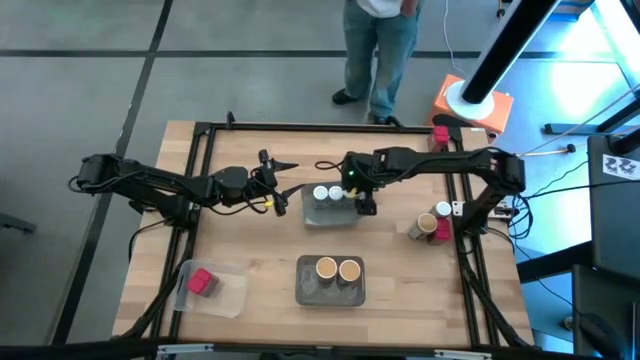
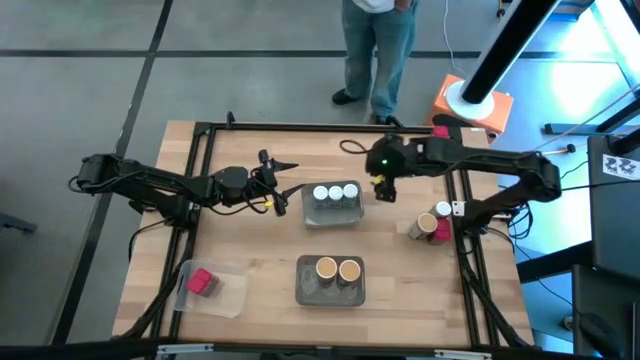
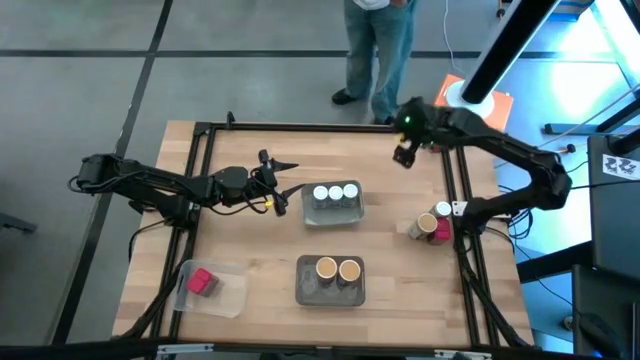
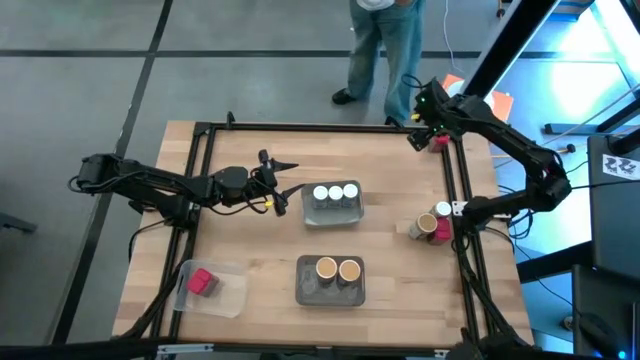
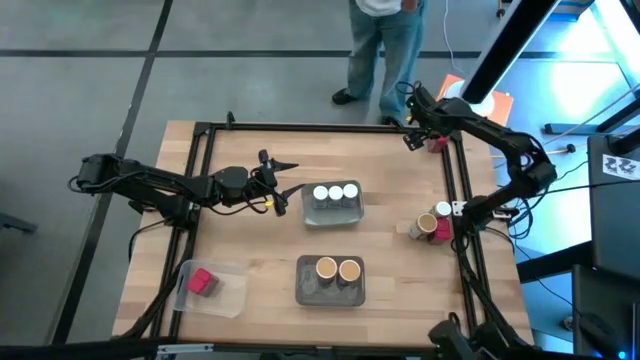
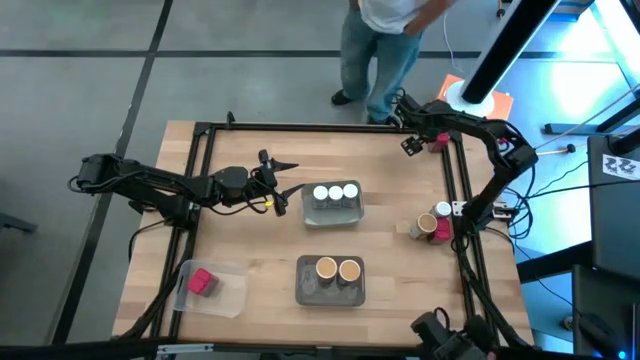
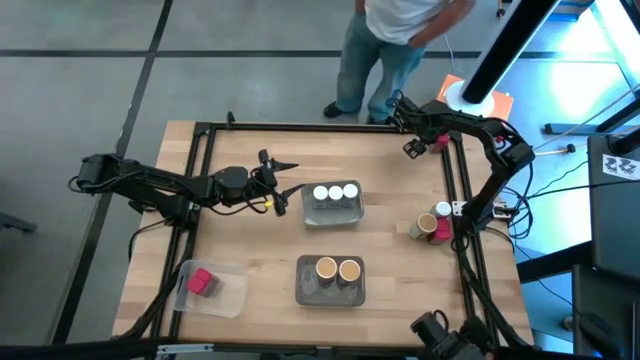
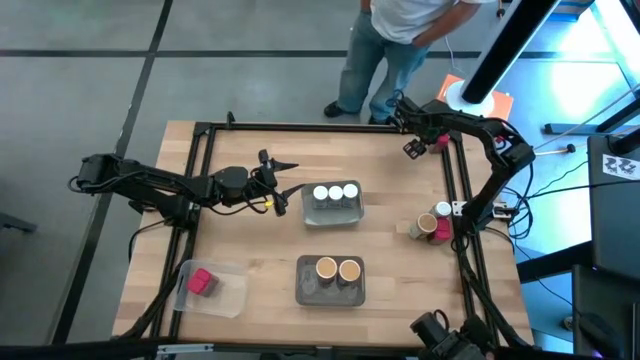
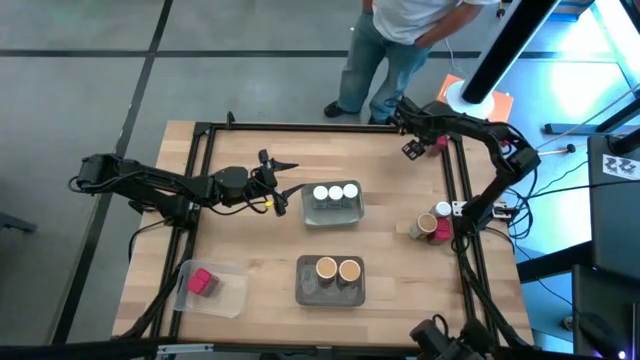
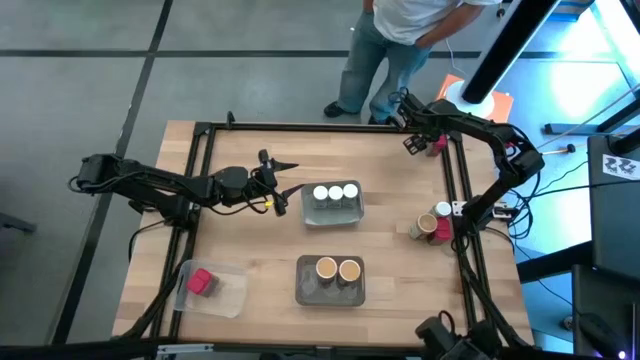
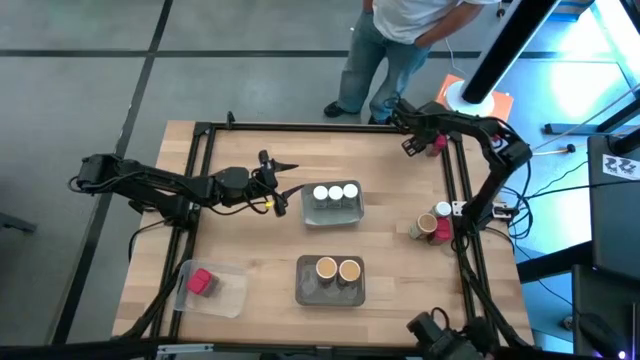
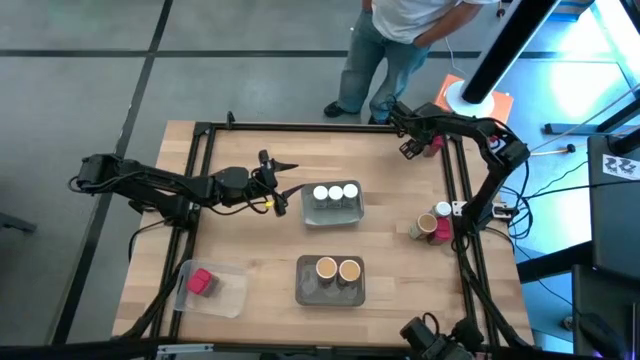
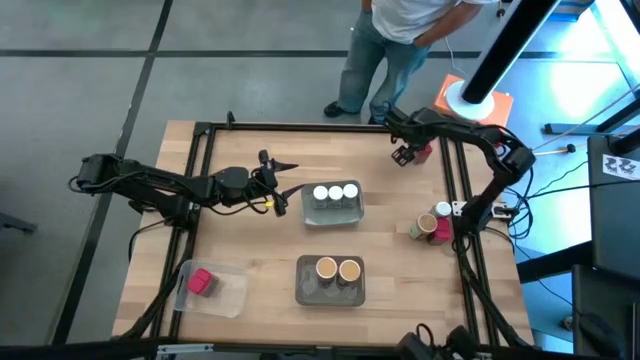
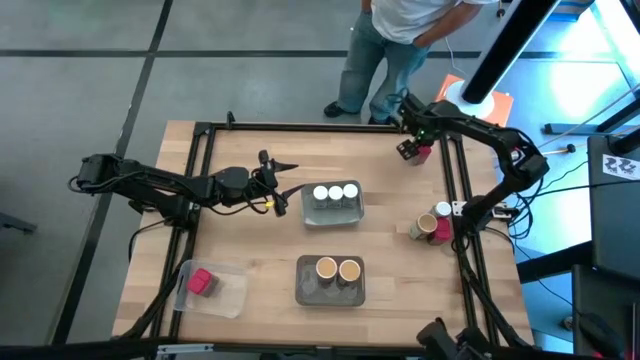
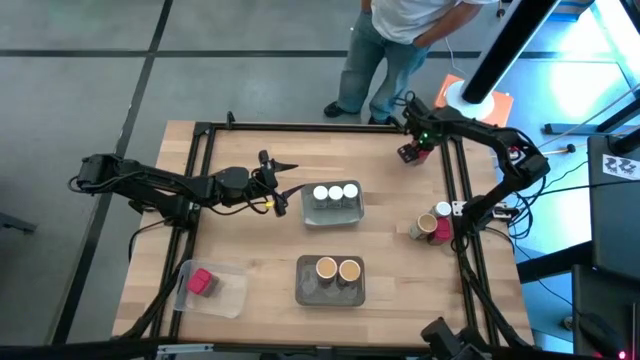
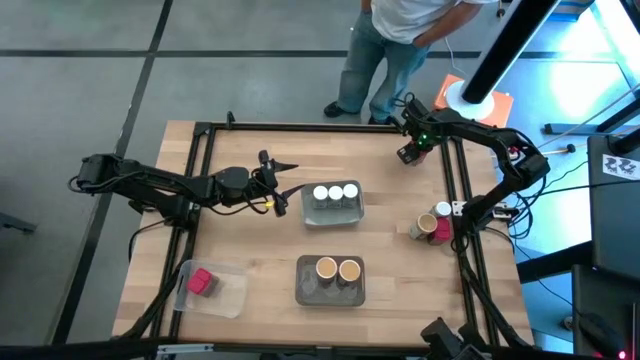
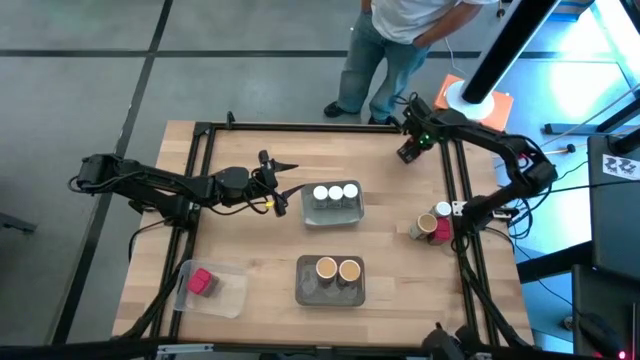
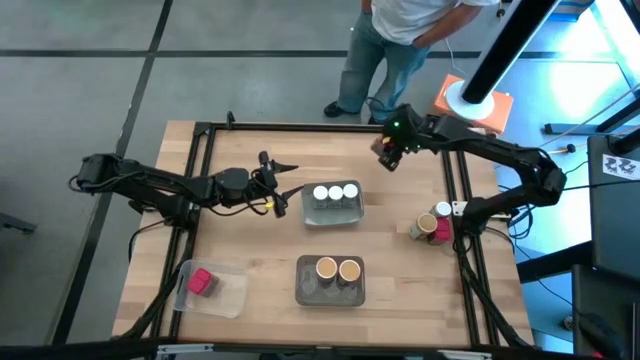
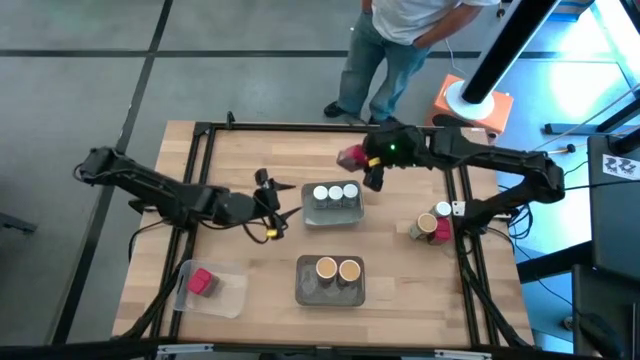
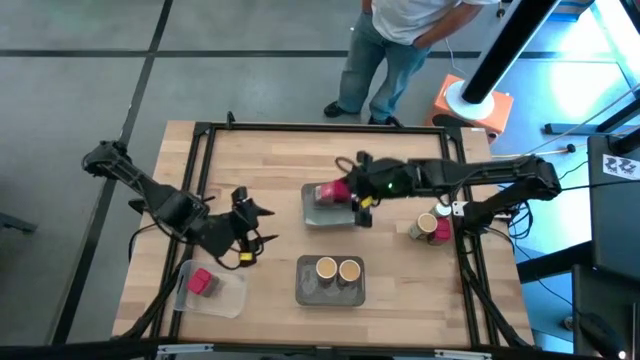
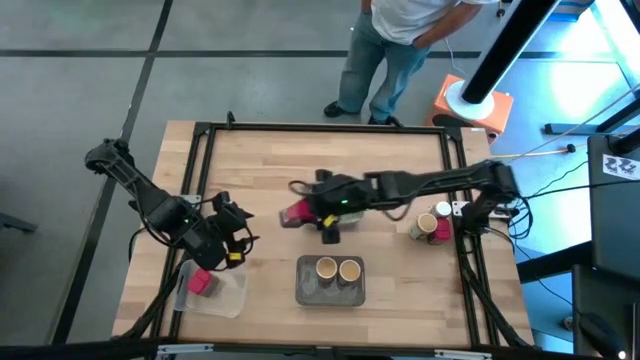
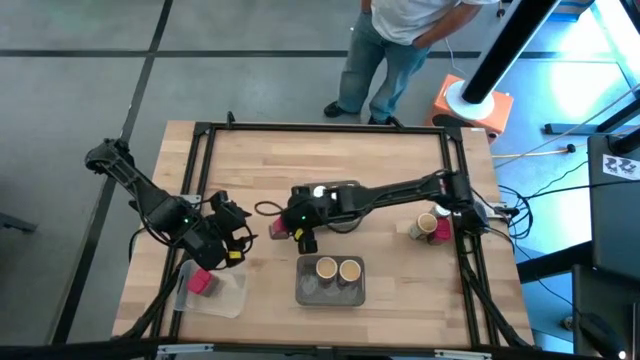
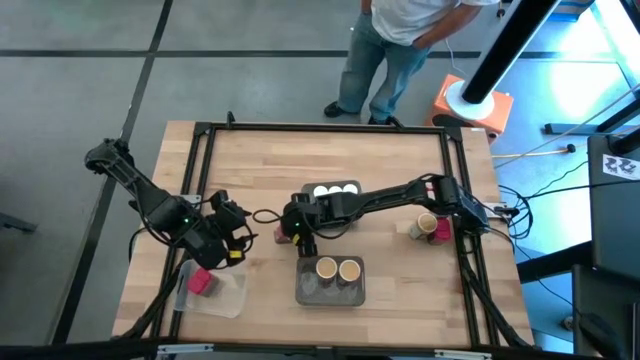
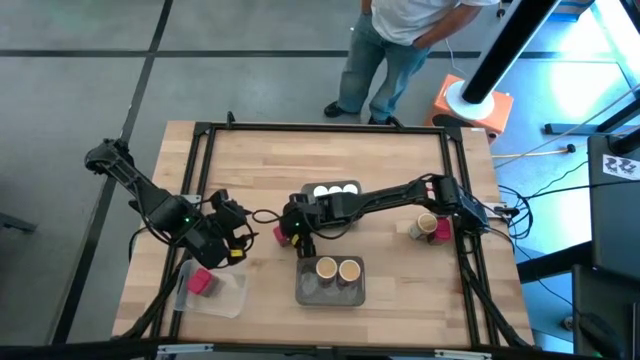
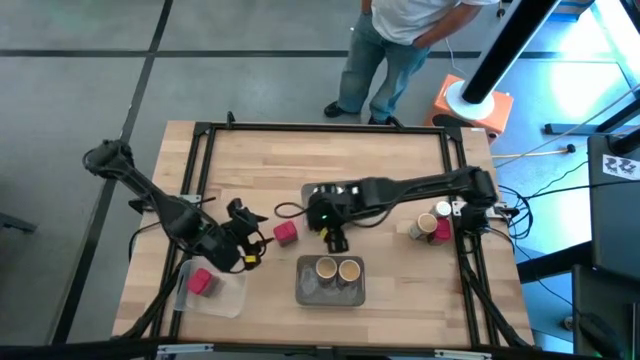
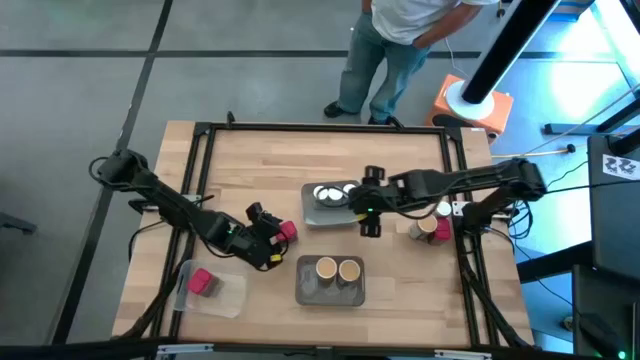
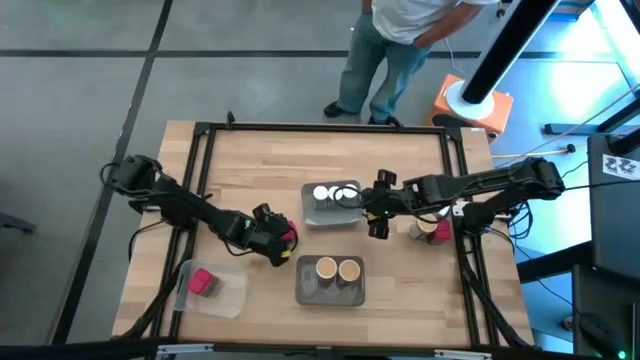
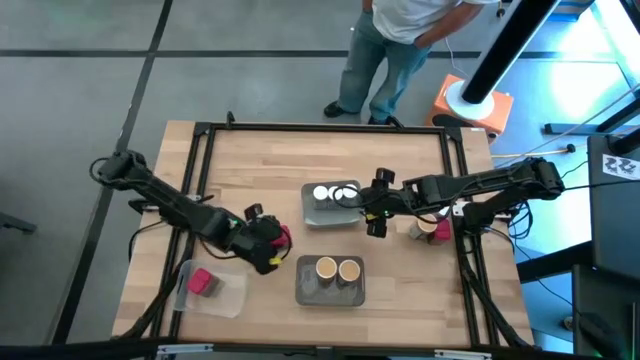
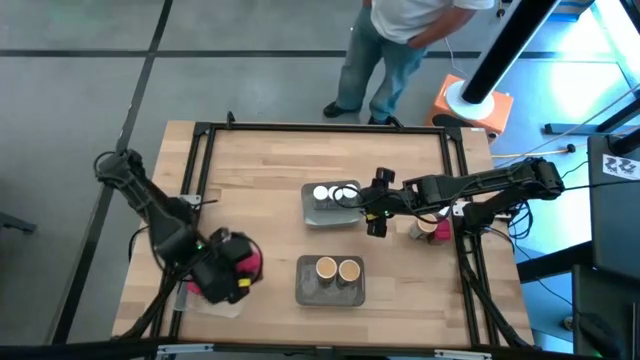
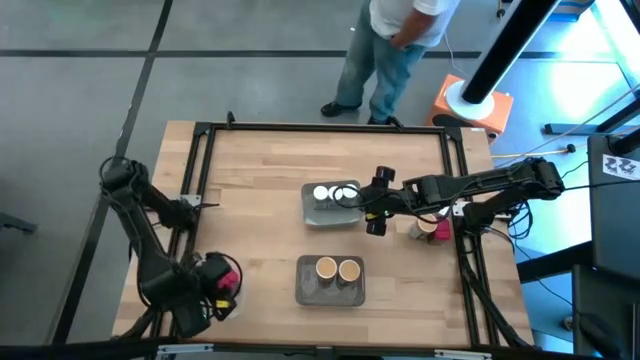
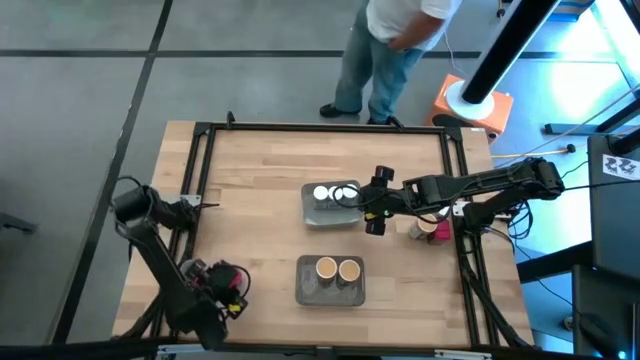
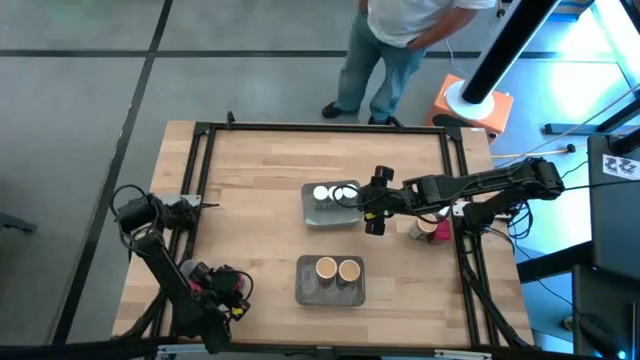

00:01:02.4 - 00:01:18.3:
Task: Sort spices by type
Put the top red seasoning can into the transparent bin

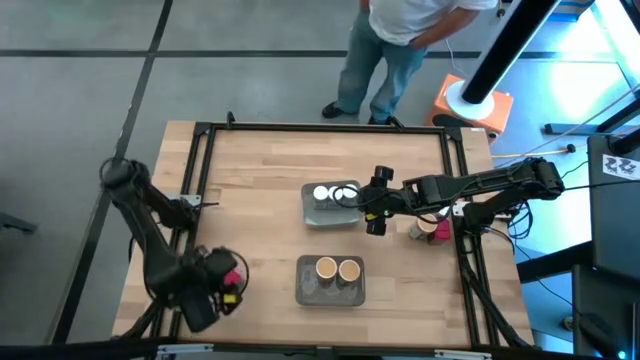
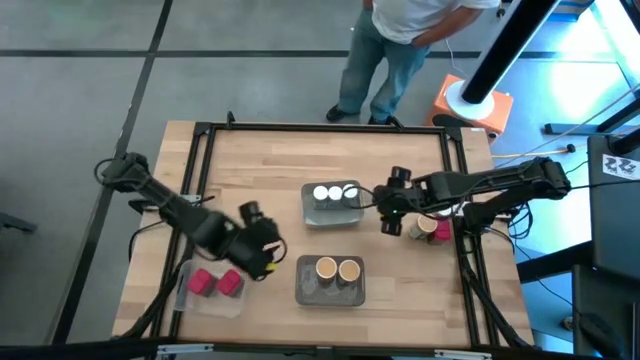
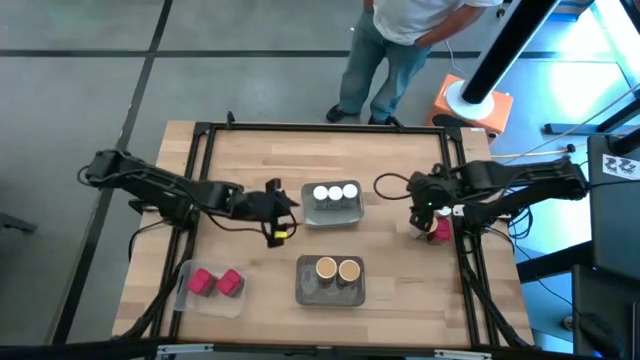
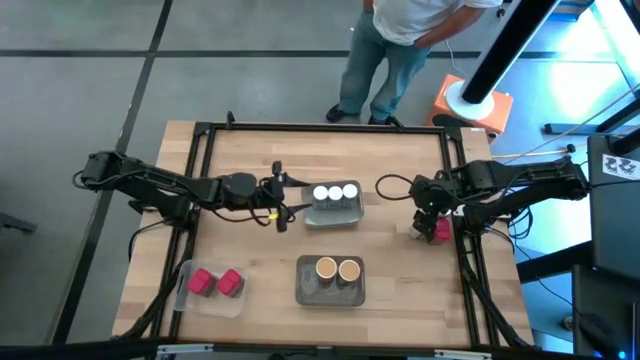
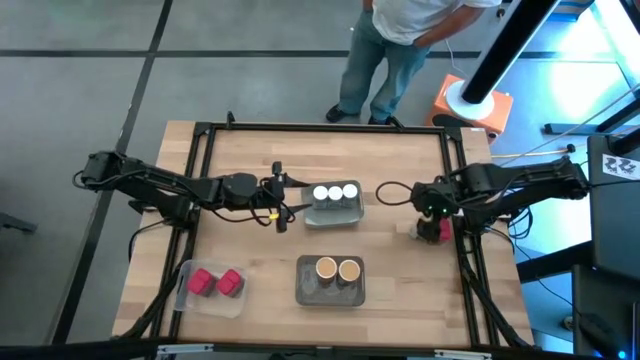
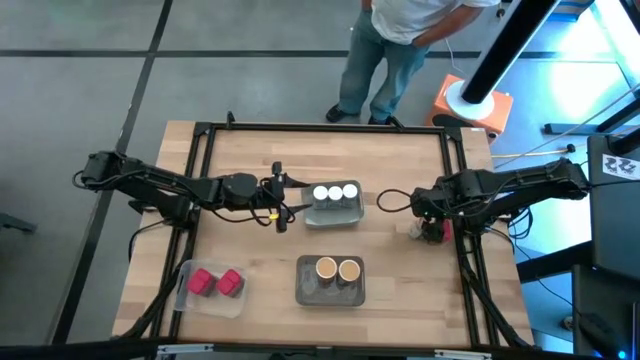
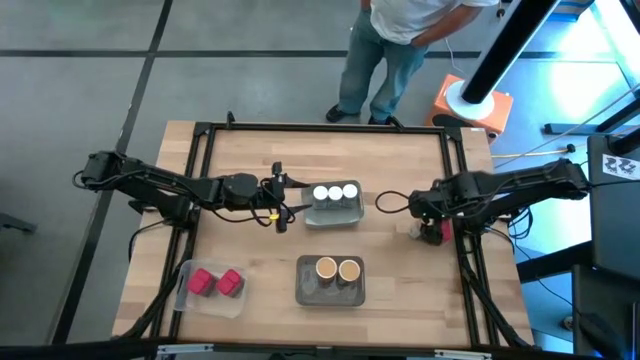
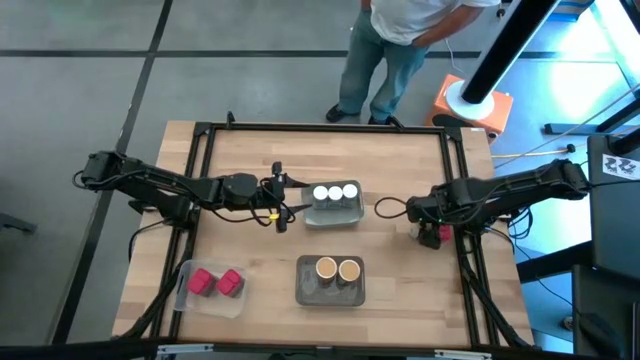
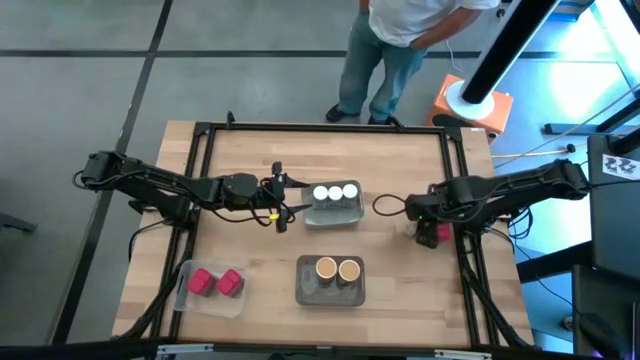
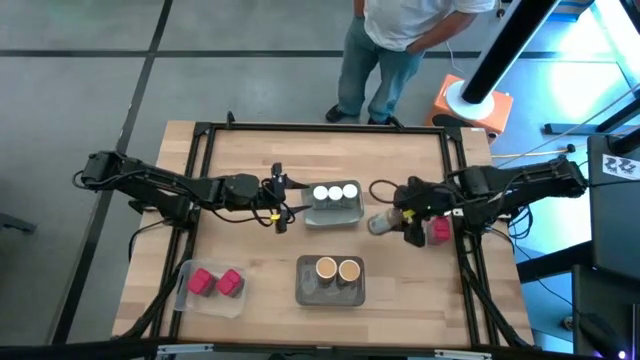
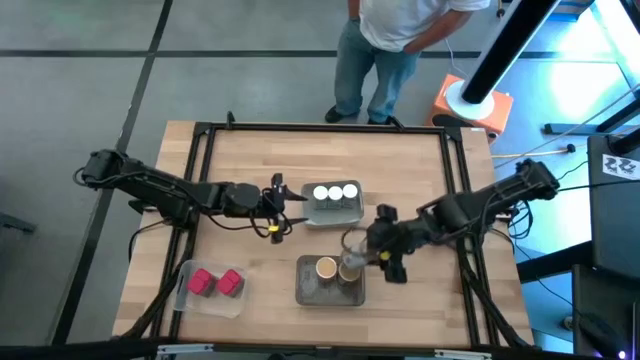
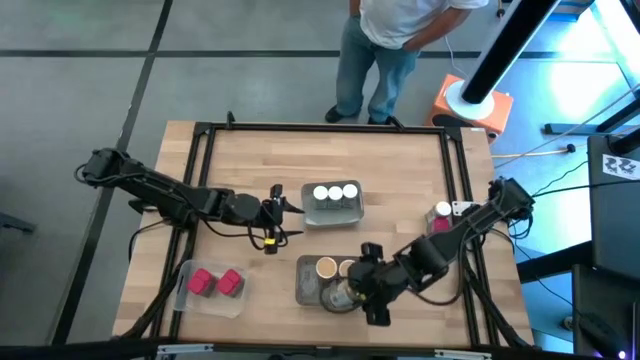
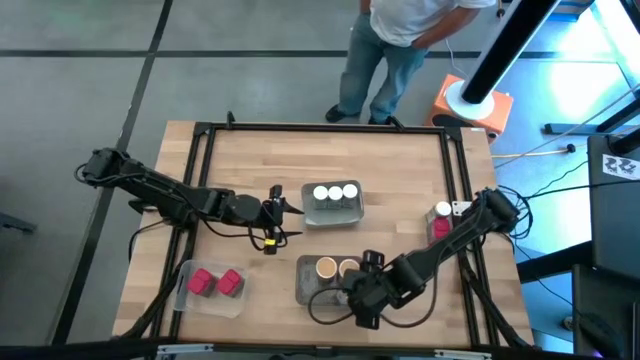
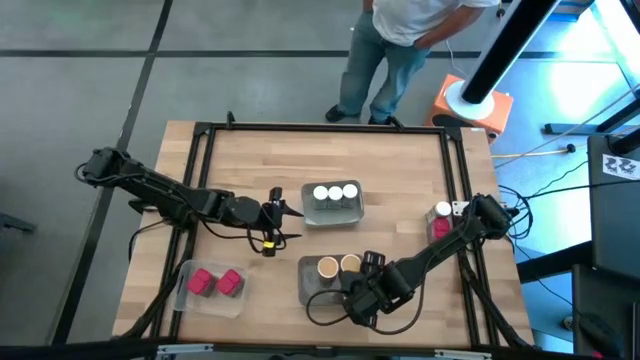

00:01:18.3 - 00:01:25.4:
Put the golden seasoning bottle into the black bin aligned with the other golden seasoning bottle
